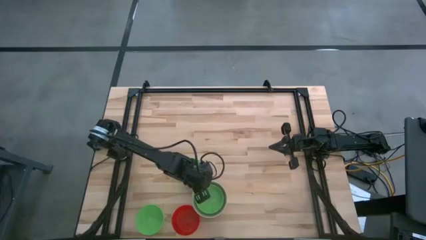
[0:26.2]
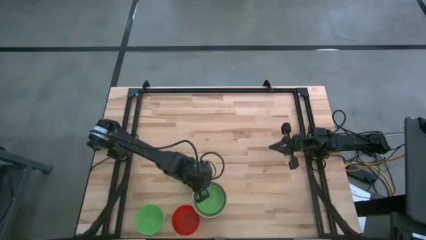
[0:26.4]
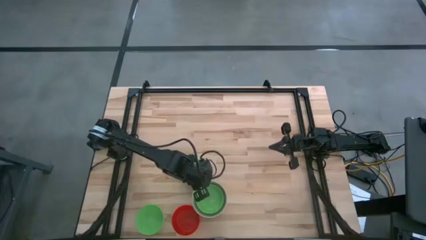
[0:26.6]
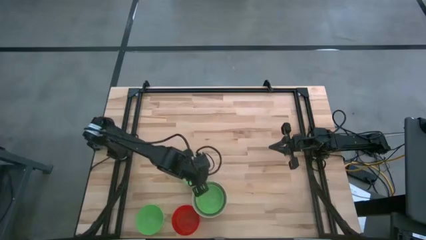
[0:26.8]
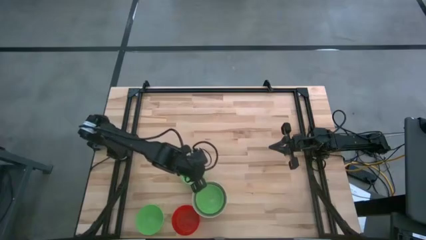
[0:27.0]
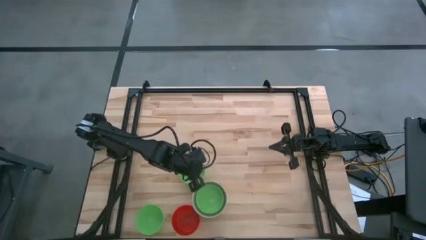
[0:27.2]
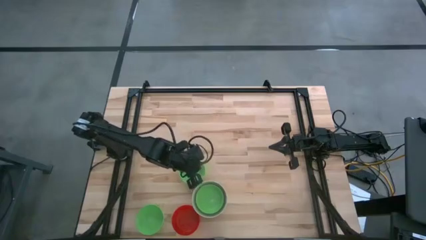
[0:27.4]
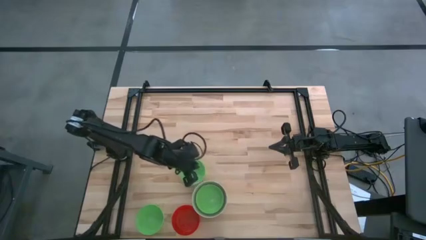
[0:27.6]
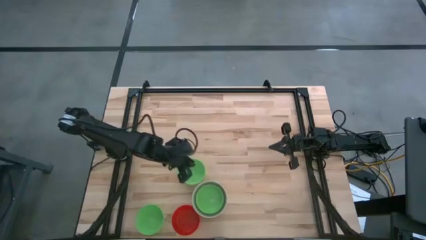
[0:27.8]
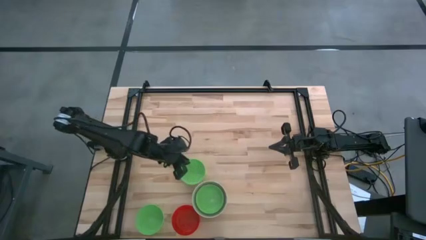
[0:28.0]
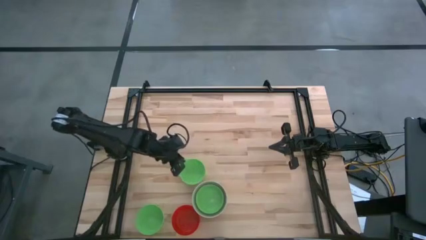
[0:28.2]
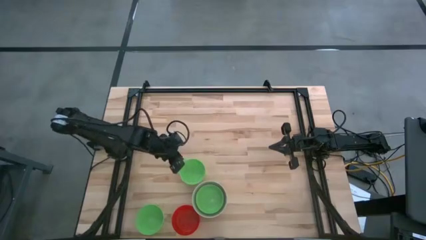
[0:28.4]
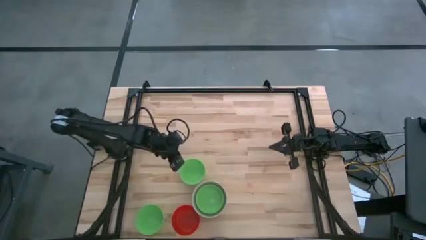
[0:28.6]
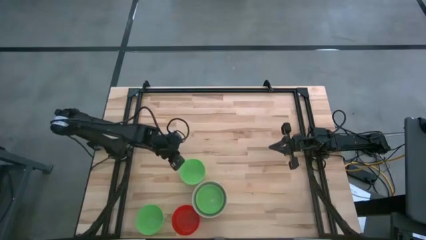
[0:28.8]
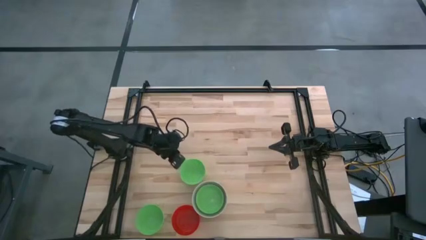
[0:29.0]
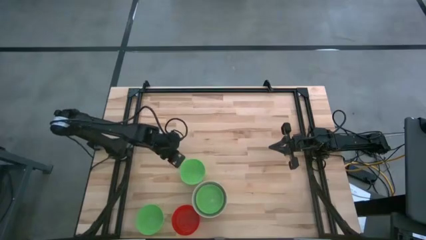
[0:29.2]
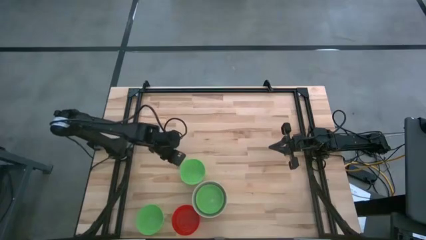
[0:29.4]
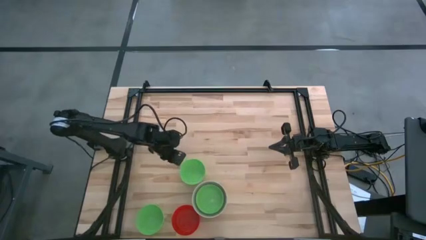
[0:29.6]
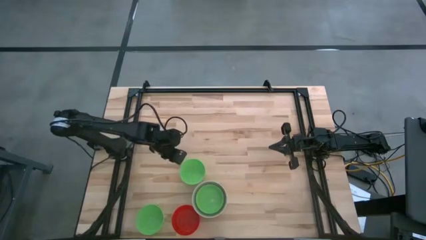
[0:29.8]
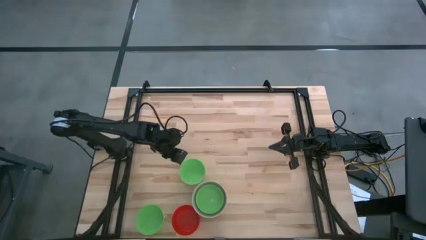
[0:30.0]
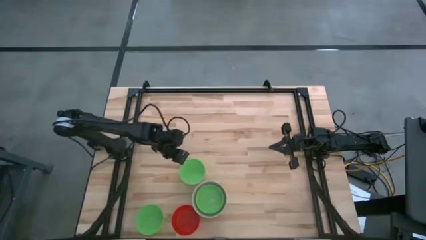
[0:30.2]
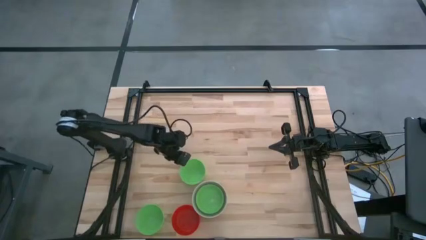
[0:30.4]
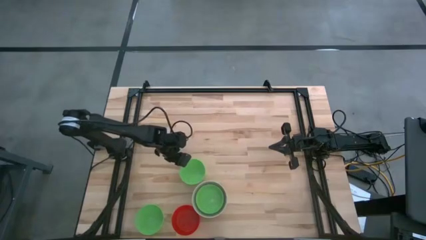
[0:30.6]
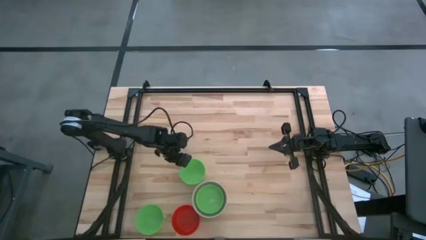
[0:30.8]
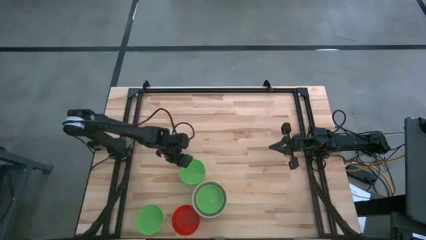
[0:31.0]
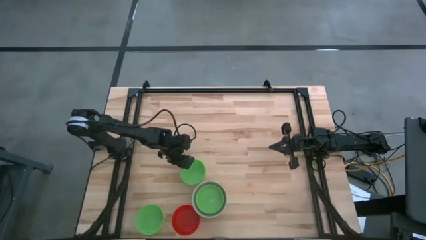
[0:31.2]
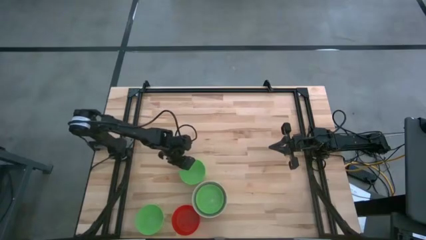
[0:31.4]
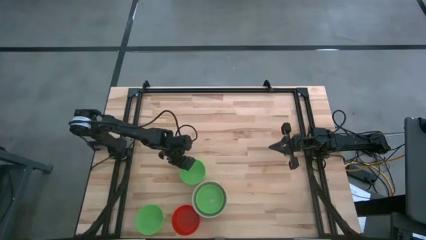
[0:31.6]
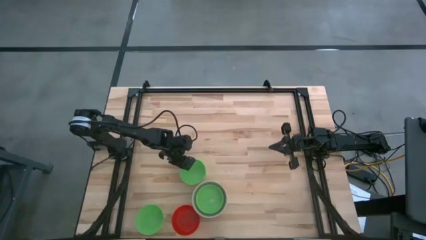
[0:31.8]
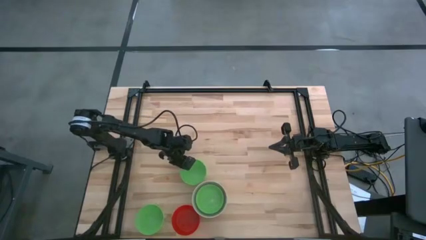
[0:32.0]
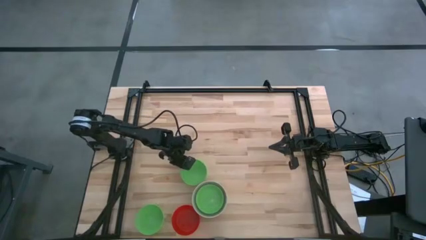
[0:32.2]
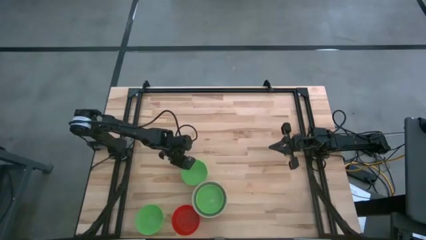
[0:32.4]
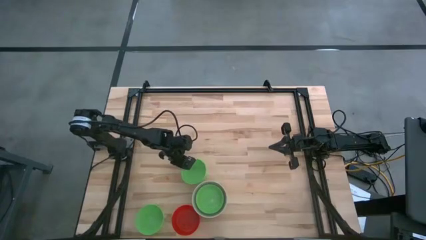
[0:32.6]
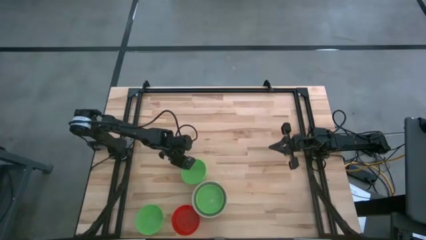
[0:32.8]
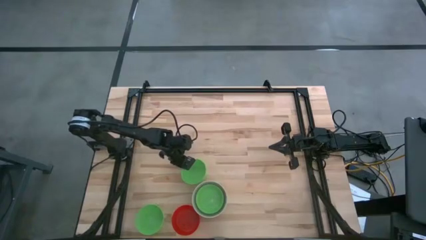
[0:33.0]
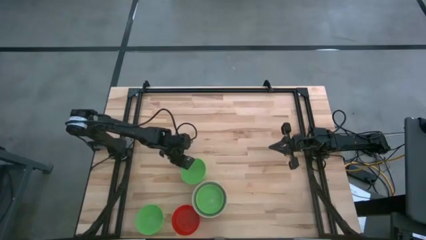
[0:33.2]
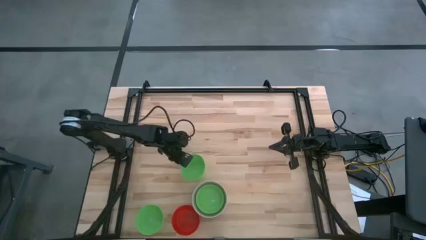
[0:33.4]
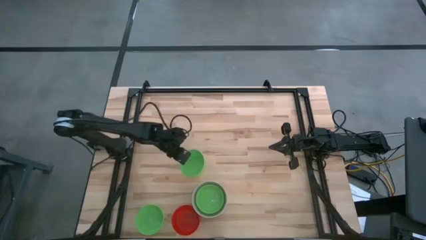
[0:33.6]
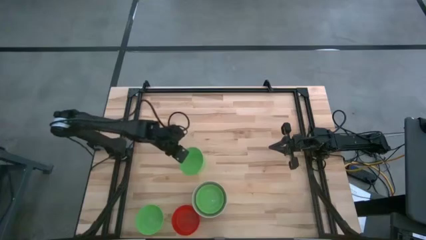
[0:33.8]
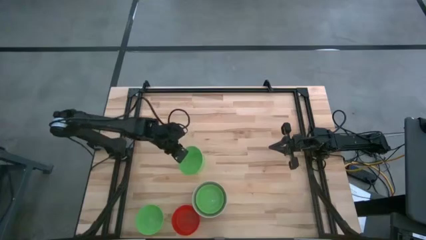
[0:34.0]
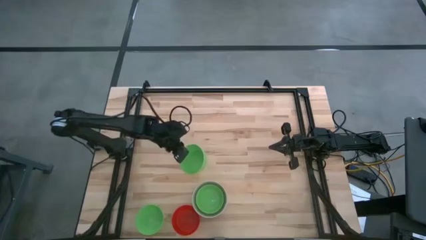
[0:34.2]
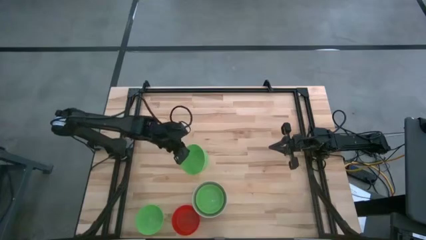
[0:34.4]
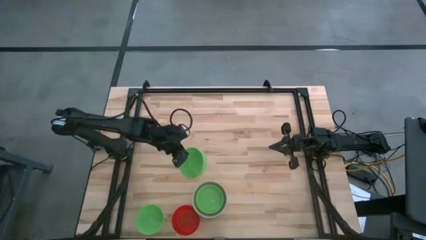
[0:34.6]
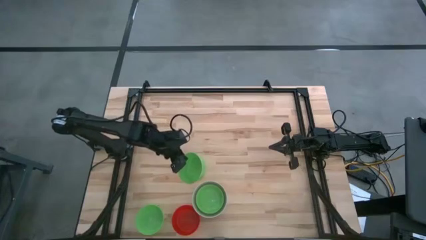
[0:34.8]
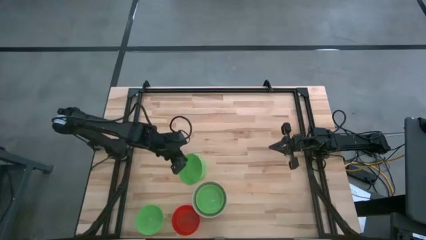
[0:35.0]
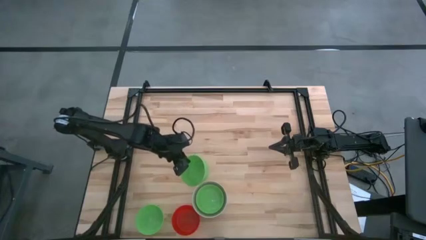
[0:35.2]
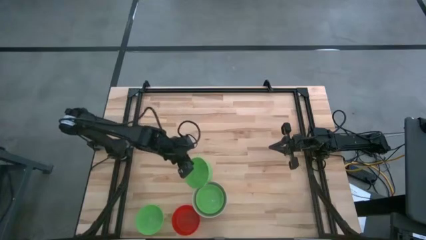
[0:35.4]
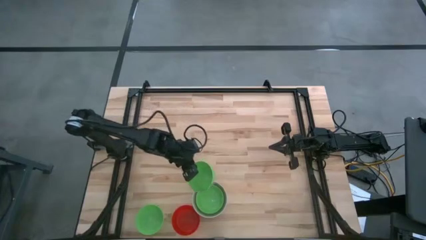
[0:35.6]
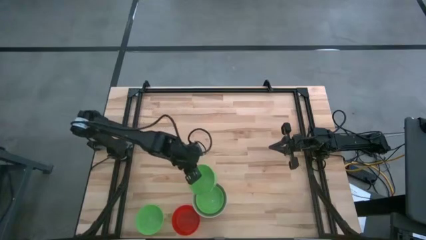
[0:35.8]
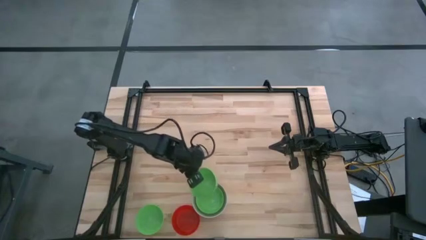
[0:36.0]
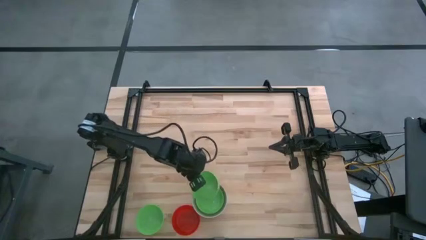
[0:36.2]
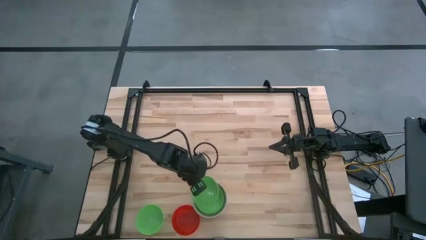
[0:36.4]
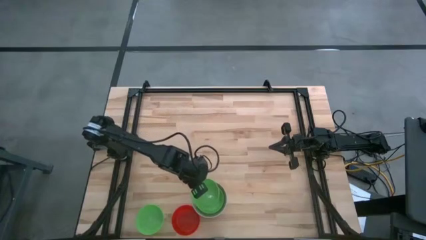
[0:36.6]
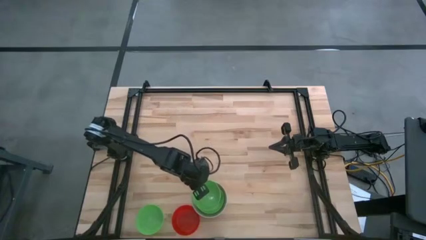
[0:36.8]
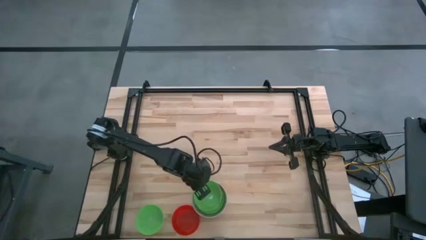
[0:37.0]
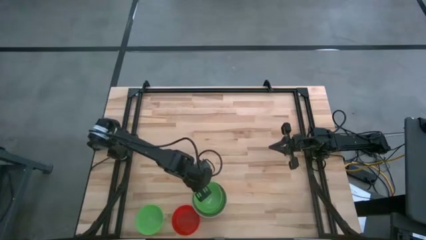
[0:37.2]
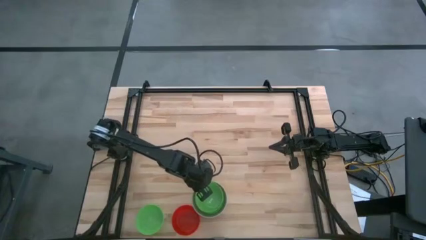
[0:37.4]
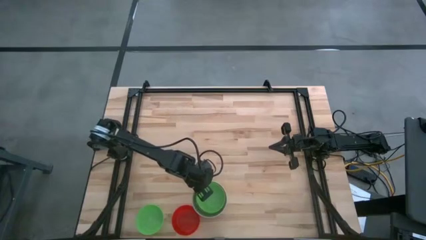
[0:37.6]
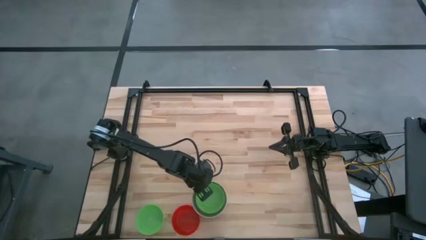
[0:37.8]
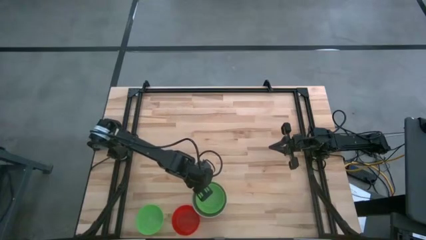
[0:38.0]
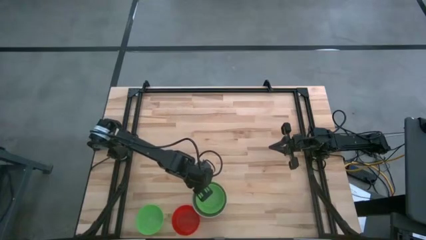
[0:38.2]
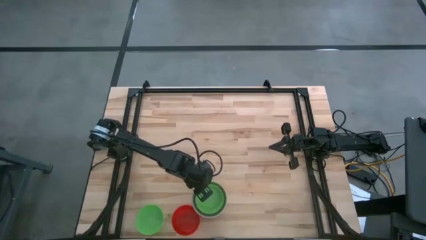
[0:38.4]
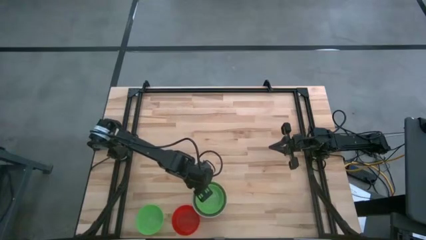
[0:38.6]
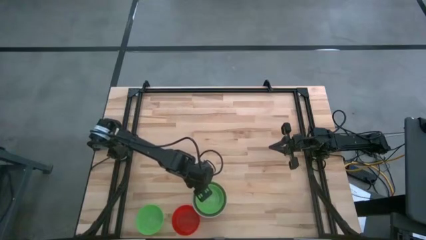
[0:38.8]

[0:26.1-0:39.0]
Stack the top green bowl on top of the green bowl
